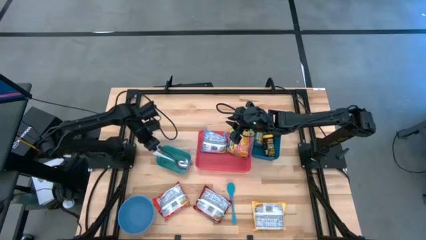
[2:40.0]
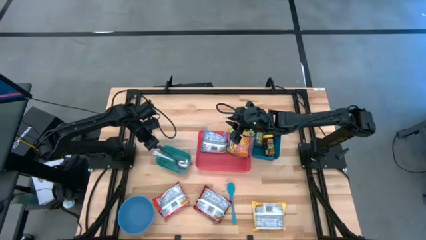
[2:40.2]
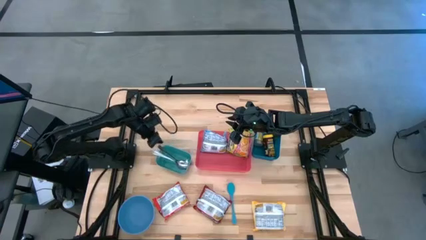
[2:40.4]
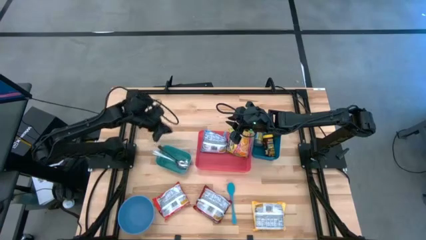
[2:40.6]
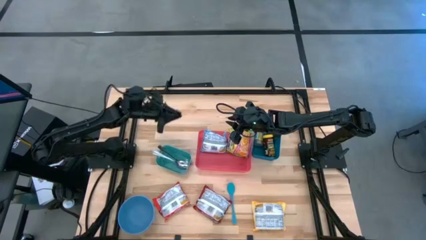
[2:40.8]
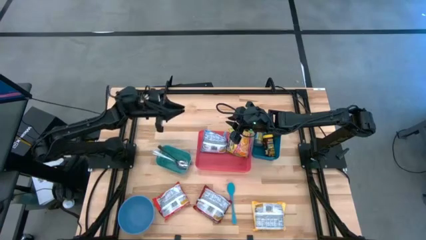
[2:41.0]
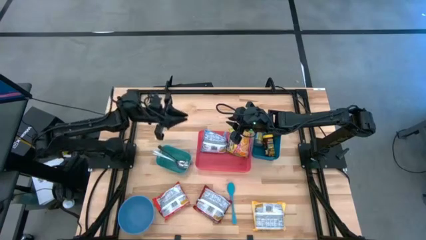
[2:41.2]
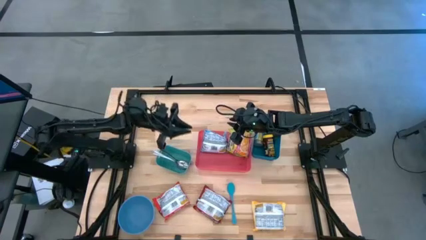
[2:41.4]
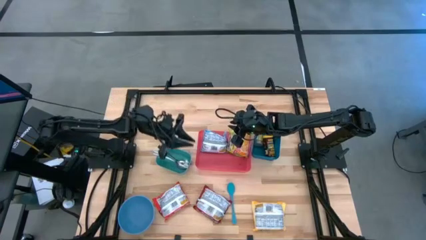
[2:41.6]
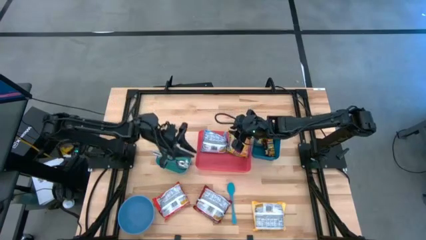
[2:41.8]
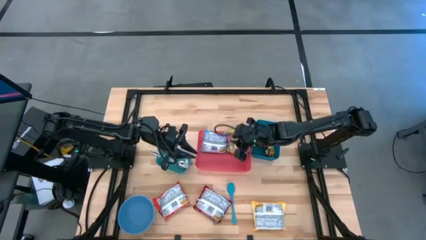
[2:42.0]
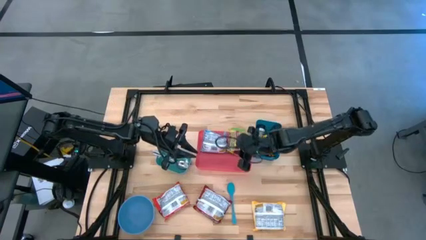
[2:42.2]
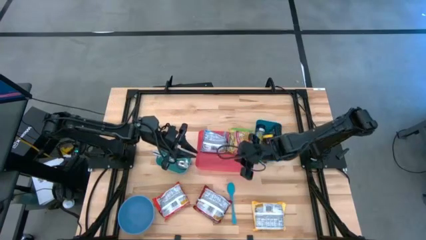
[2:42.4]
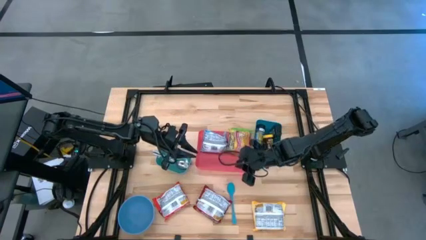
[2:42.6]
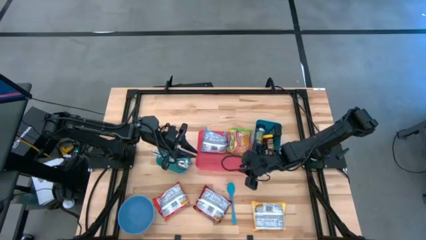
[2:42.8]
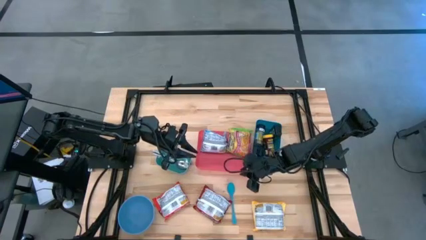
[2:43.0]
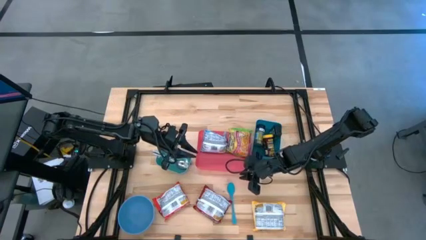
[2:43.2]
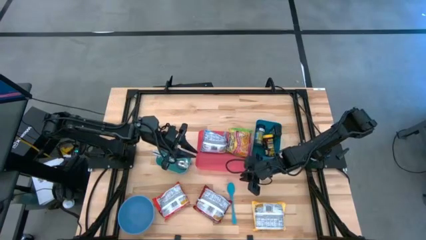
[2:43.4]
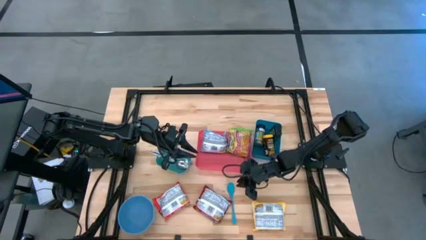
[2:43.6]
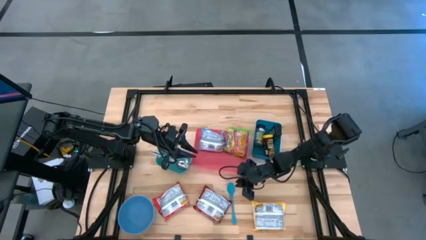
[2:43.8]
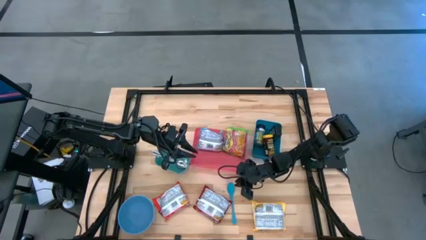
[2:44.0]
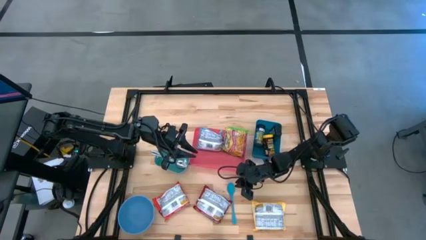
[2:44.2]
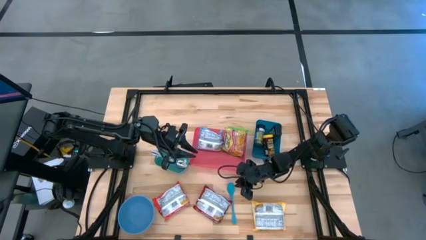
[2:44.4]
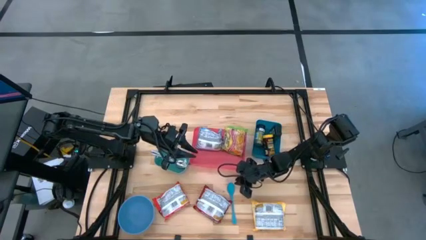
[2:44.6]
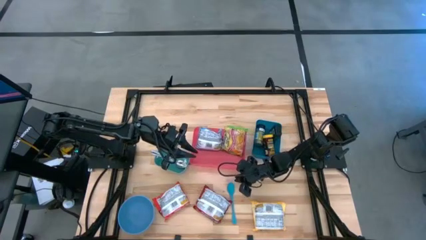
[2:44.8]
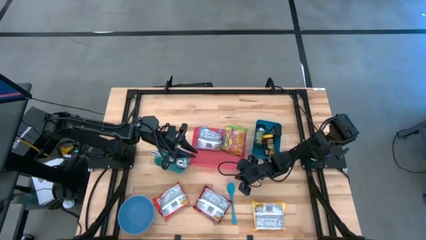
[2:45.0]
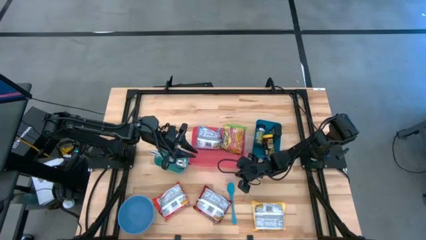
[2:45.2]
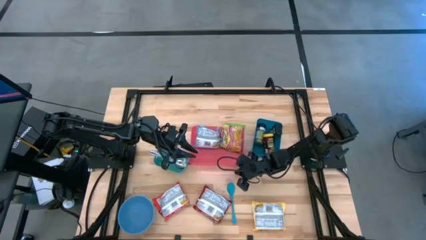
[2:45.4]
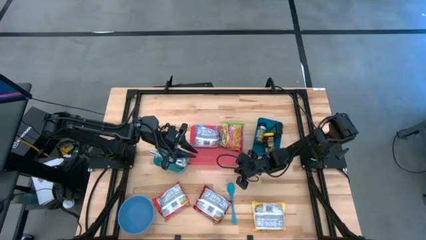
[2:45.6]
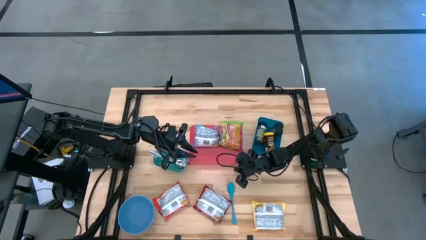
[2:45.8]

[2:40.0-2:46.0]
Task: Pick & Place Food Item
Adjust the red bin

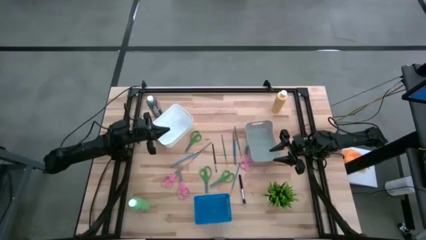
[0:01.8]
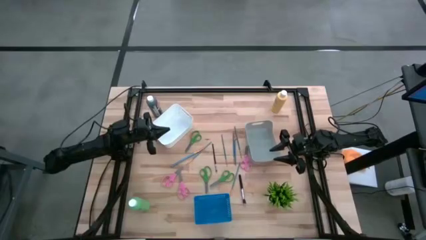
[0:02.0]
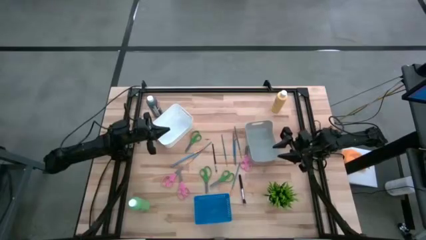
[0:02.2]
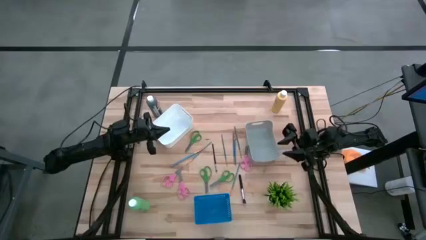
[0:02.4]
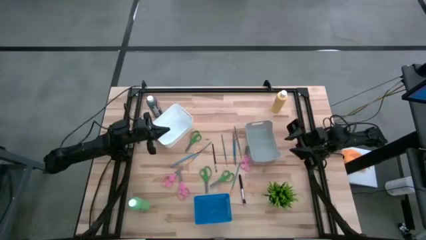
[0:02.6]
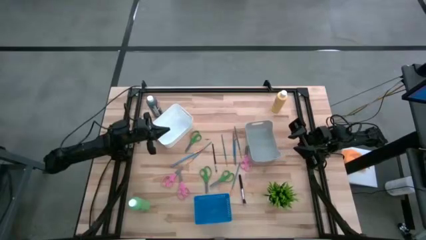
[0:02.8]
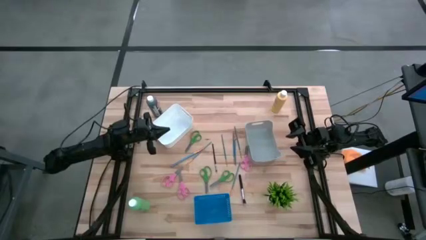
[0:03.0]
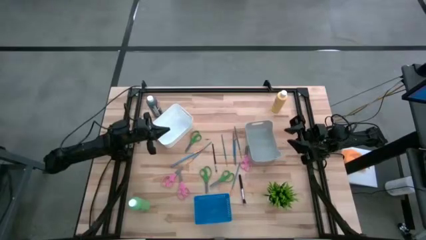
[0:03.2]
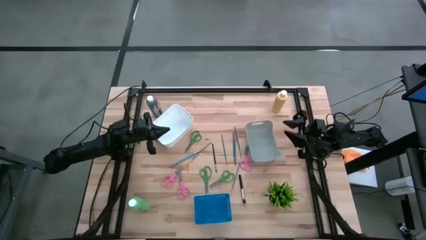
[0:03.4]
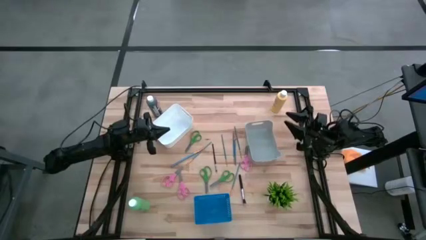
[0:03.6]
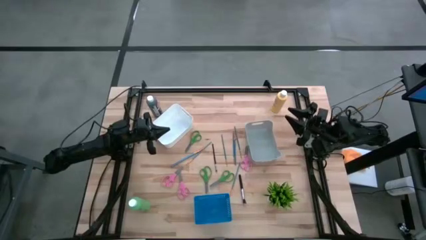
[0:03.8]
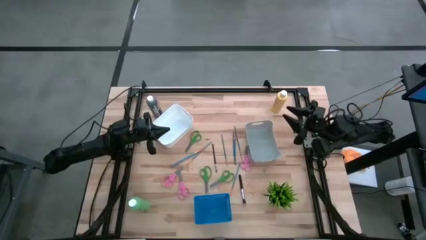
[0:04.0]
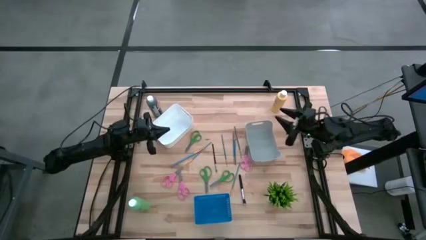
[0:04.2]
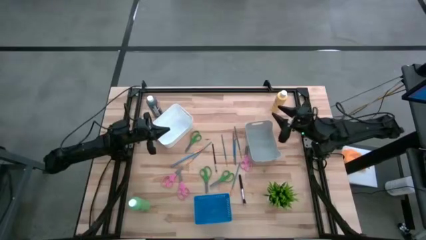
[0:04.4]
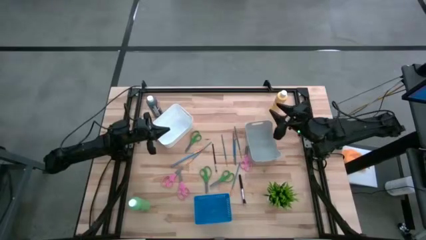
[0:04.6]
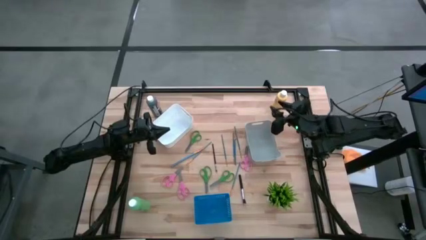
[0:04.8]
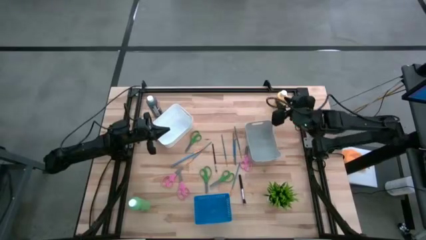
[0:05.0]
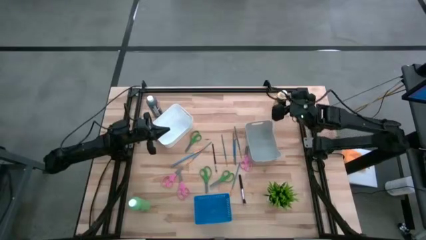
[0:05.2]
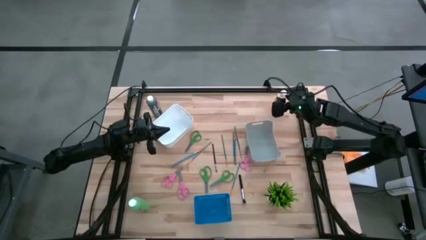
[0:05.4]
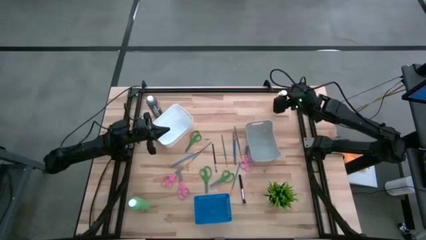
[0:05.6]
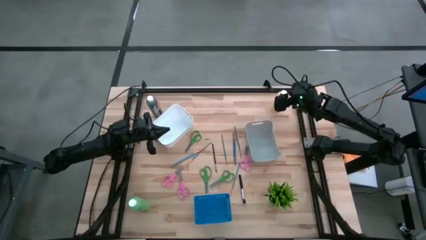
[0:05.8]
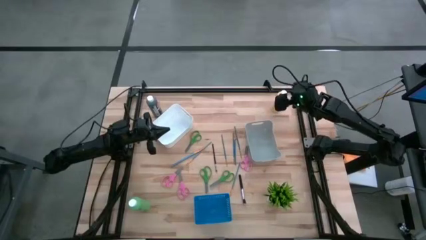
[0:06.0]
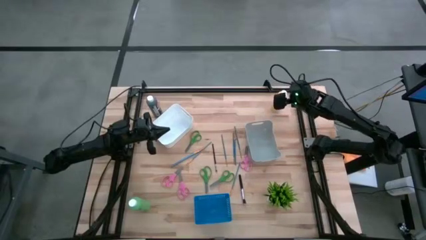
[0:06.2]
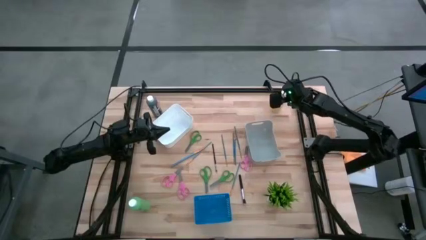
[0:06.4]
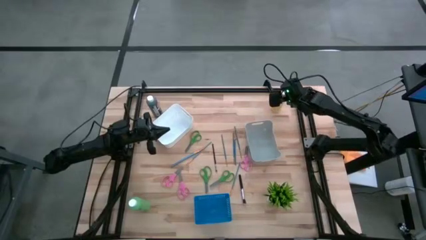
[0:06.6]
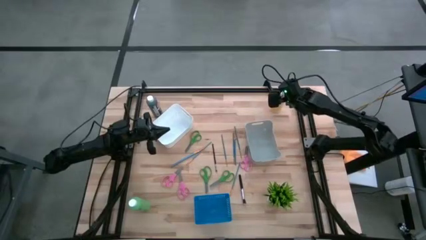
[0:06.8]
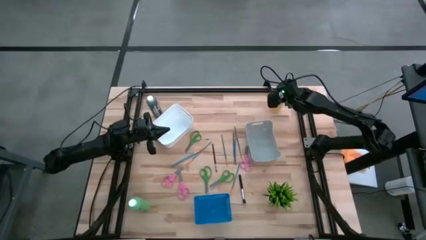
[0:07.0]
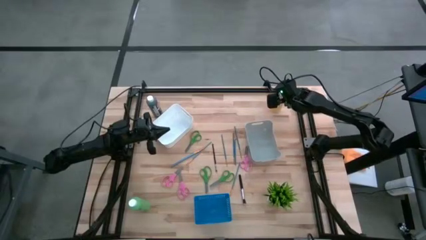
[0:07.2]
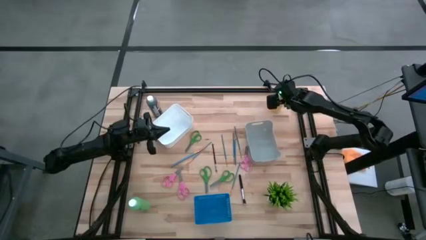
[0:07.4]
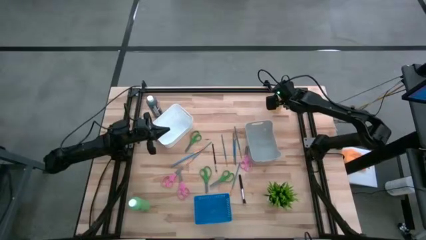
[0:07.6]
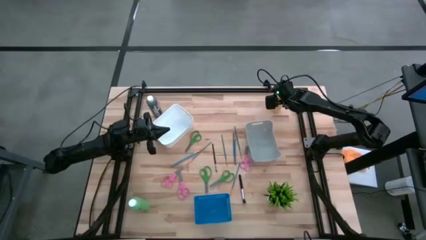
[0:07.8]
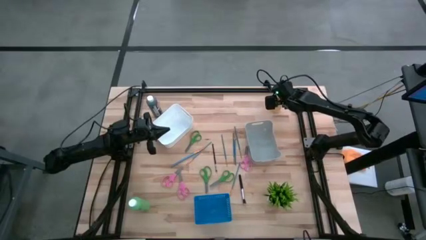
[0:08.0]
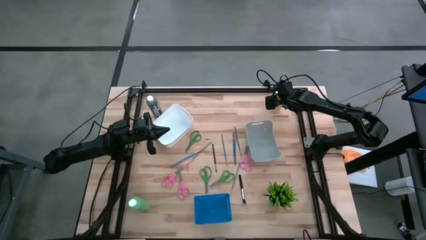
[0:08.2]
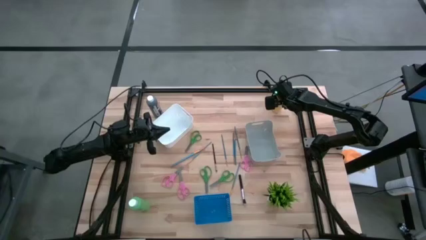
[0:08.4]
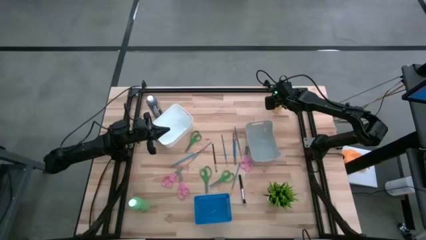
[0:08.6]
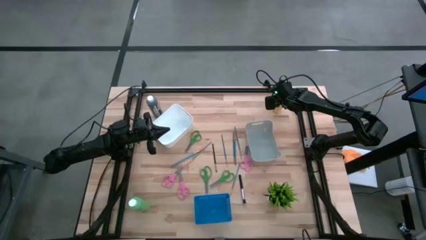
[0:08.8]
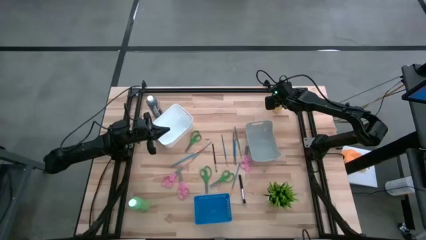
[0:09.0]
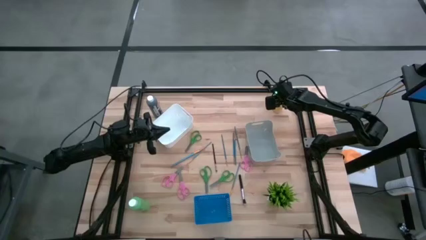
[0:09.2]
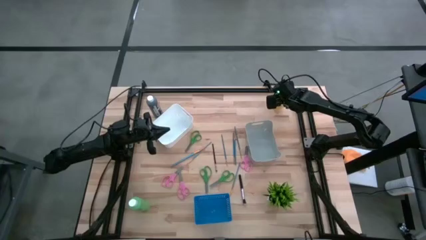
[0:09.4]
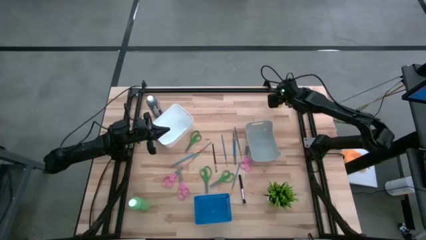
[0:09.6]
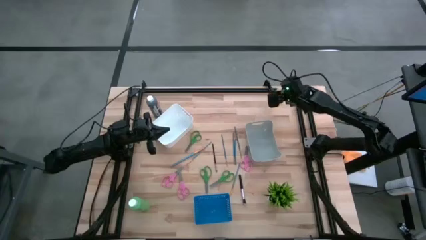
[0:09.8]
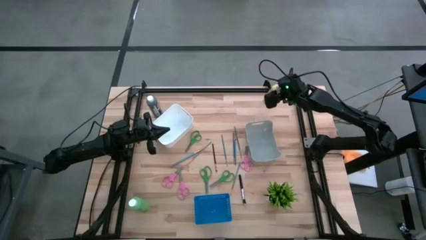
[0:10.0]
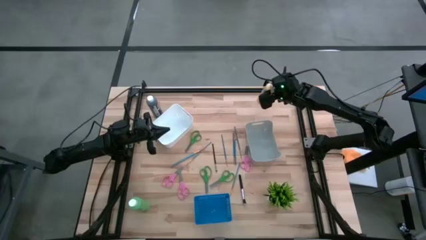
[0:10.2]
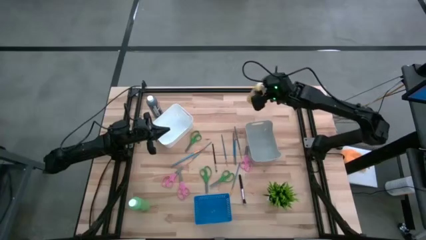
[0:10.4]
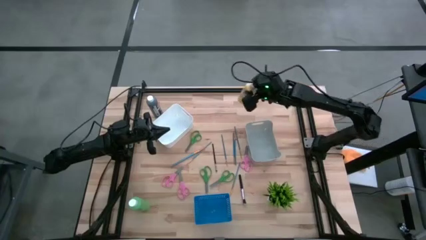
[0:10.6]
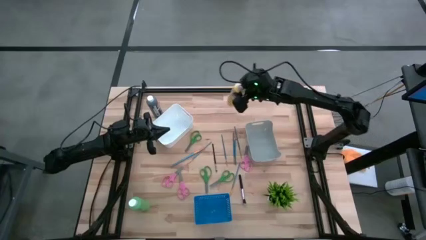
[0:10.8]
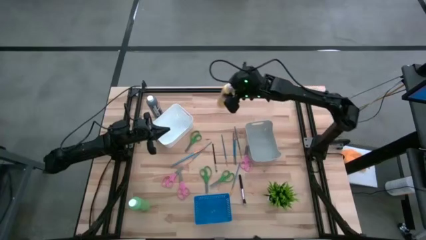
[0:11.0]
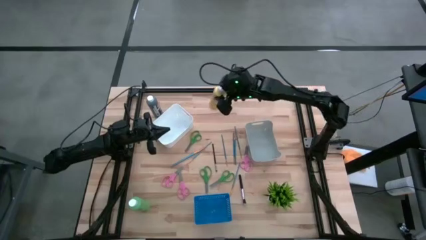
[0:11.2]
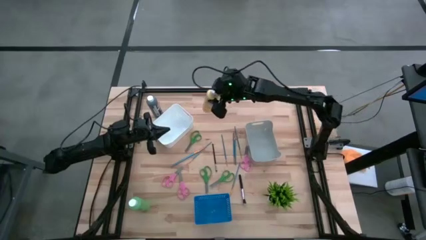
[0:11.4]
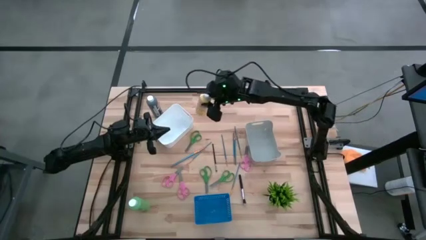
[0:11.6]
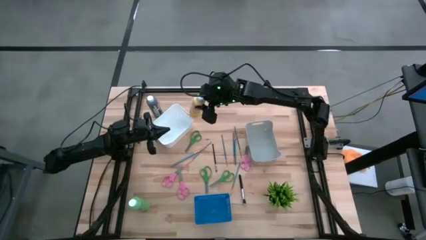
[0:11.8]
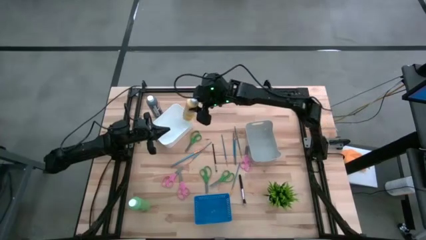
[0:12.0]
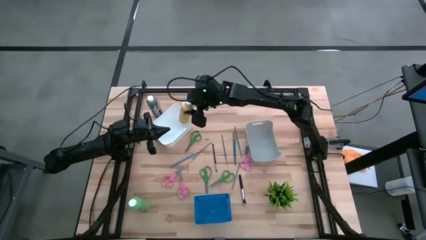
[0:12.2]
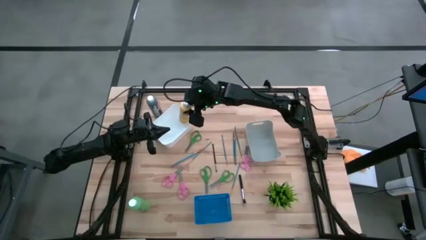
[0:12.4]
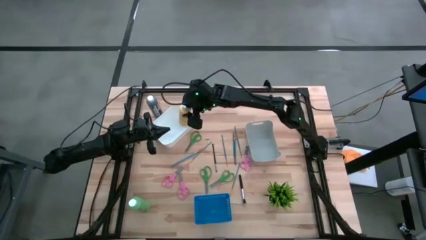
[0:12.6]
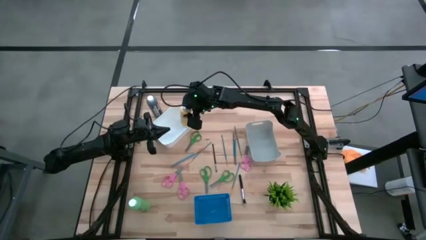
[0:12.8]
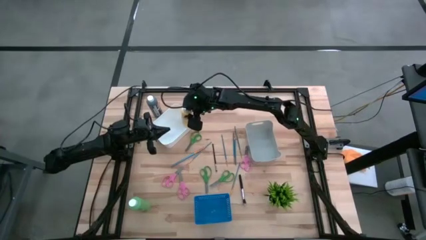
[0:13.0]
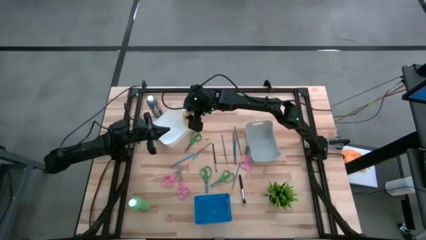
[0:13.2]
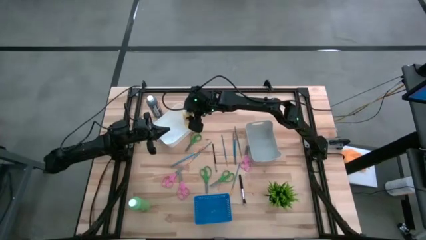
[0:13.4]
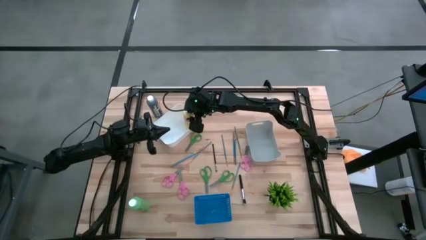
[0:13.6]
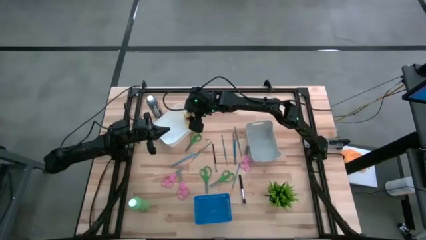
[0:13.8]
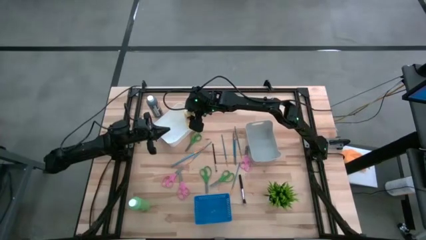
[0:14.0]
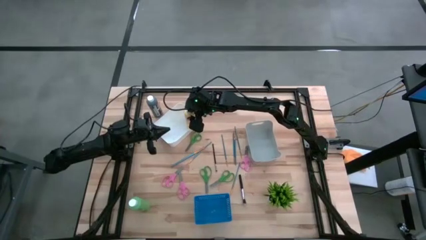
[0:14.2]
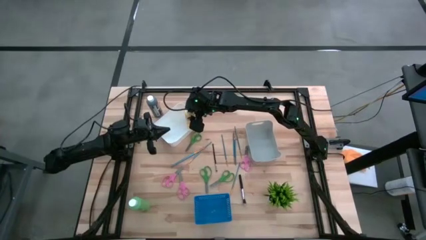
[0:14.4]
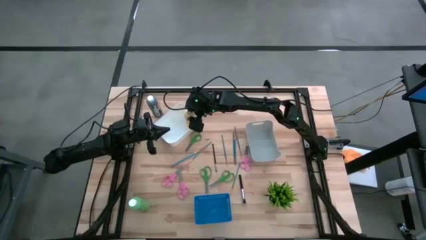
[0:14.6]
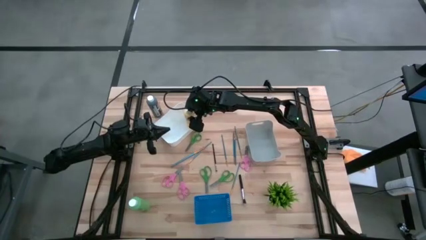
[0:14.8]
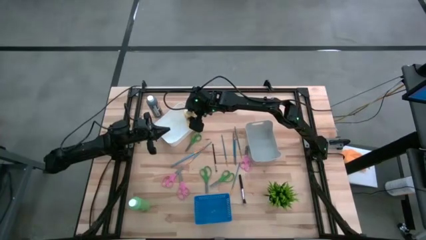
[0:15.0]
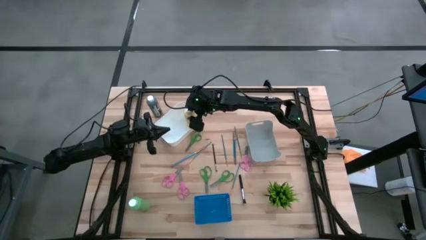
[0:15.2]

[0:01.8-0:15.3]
Task: Pick & Place Paint Supplies
Put the yellow paint bottle into the white bin
